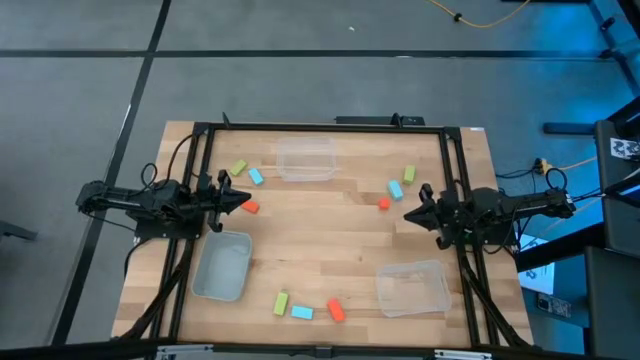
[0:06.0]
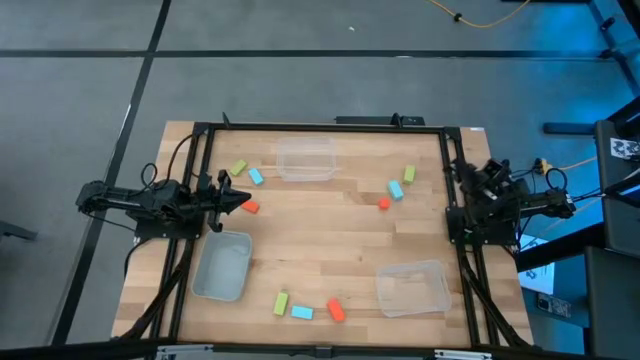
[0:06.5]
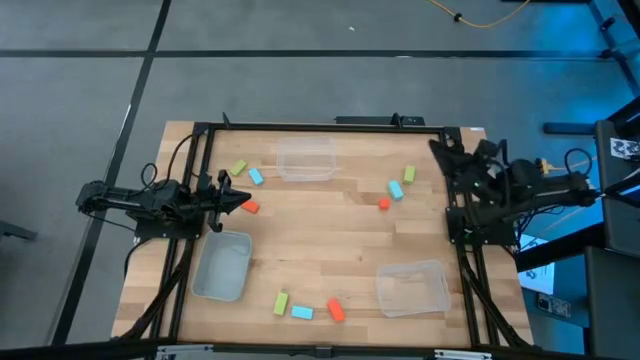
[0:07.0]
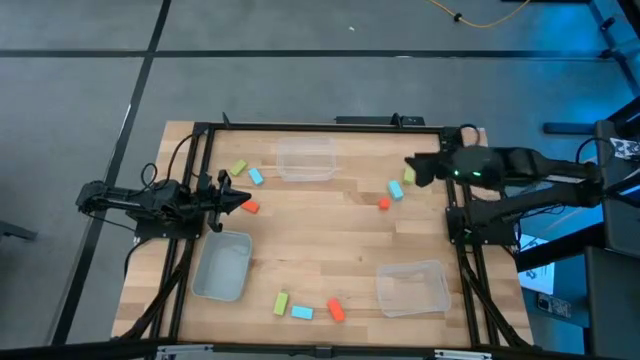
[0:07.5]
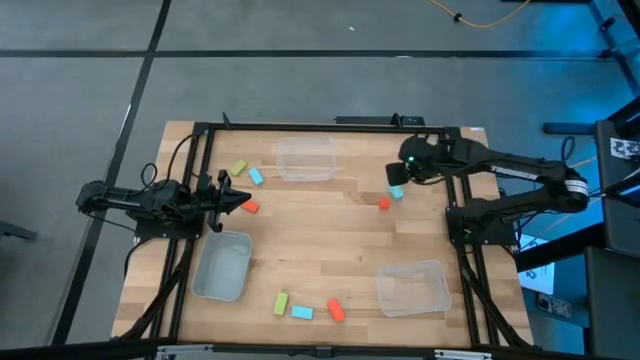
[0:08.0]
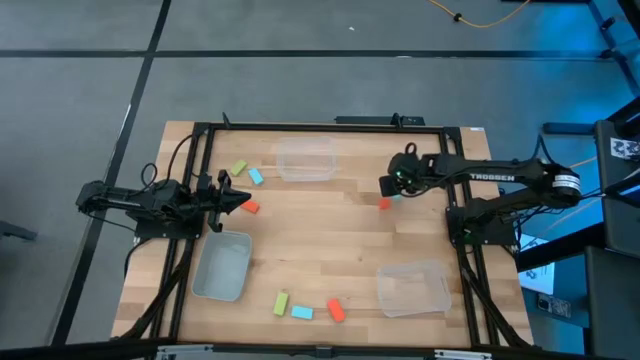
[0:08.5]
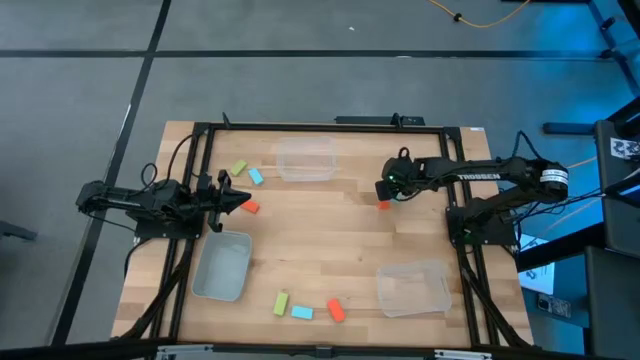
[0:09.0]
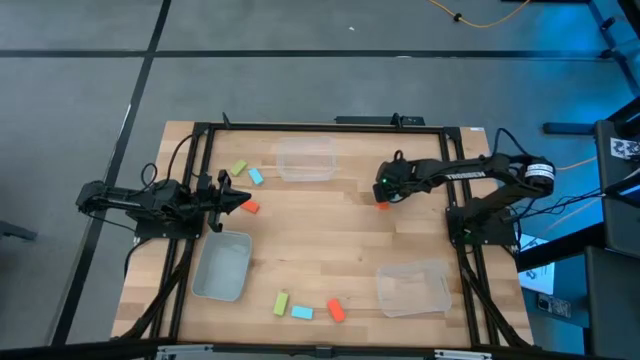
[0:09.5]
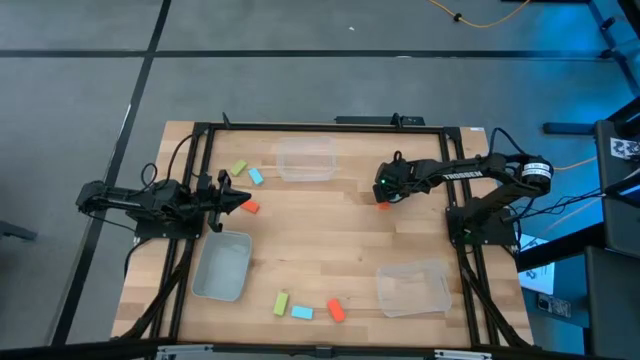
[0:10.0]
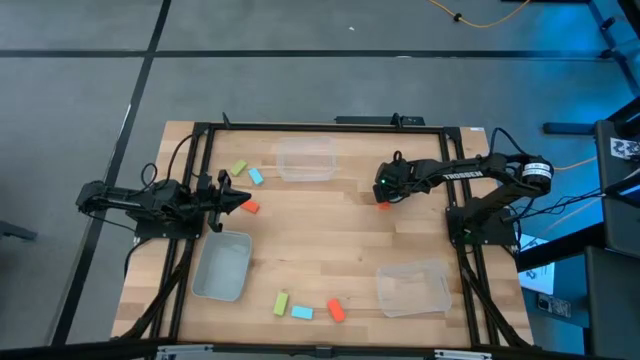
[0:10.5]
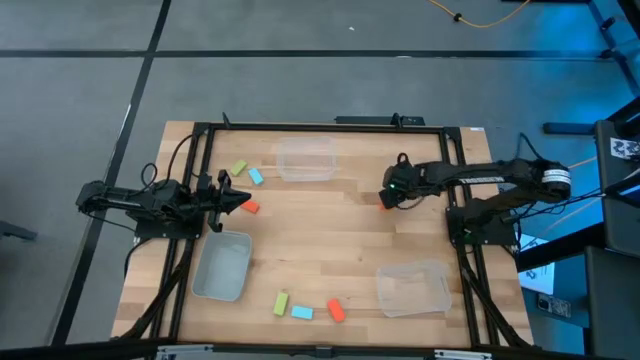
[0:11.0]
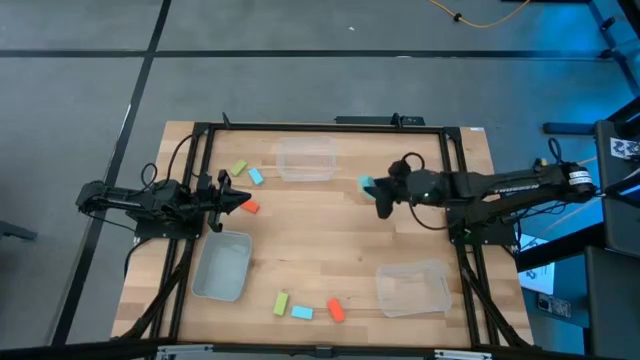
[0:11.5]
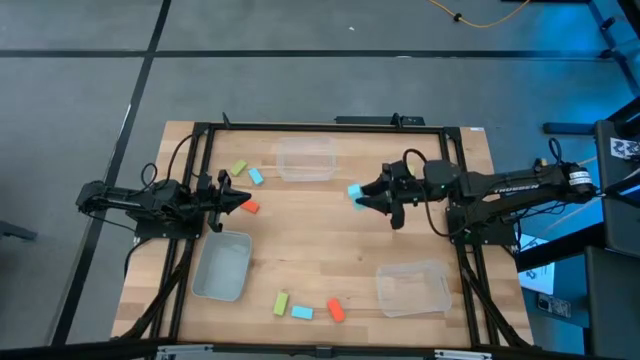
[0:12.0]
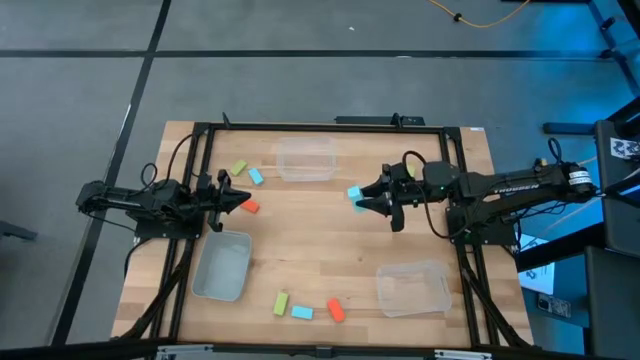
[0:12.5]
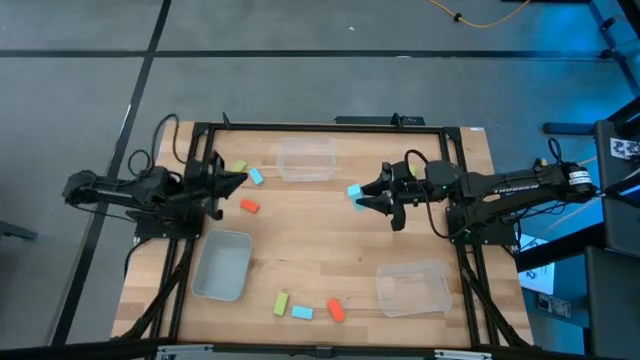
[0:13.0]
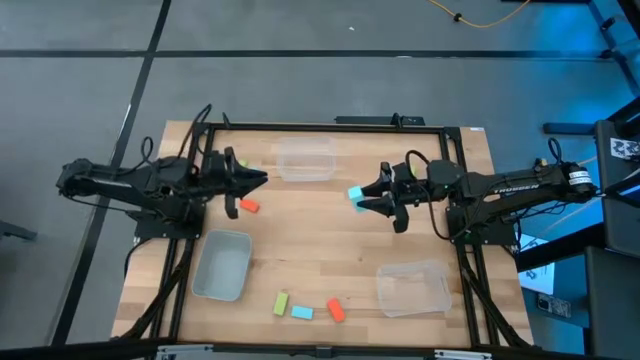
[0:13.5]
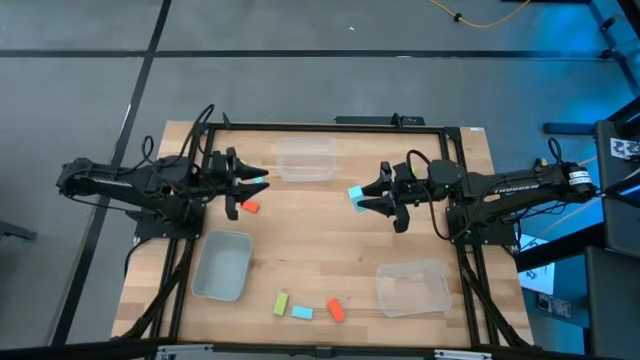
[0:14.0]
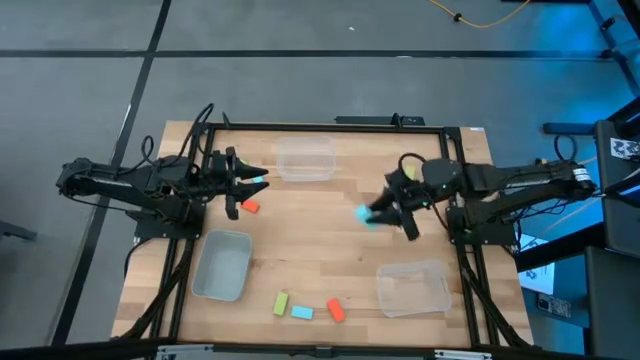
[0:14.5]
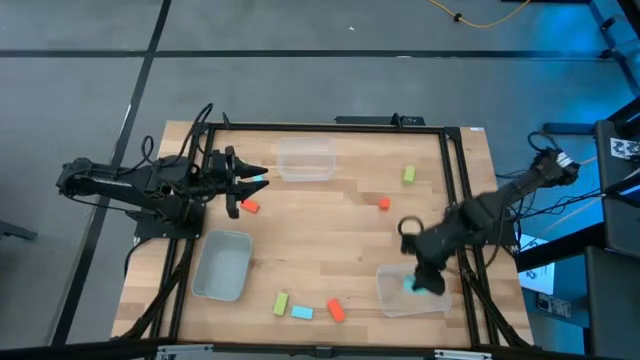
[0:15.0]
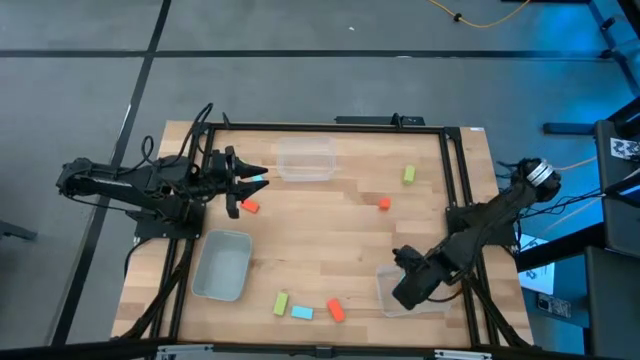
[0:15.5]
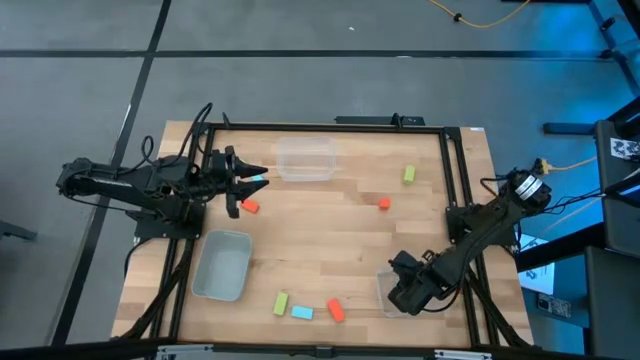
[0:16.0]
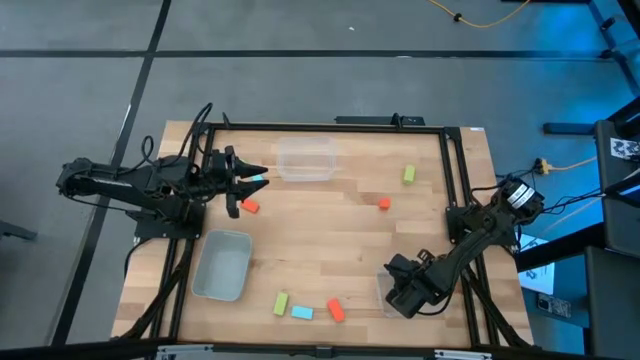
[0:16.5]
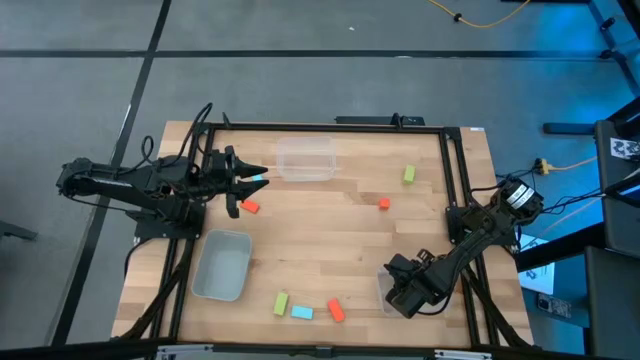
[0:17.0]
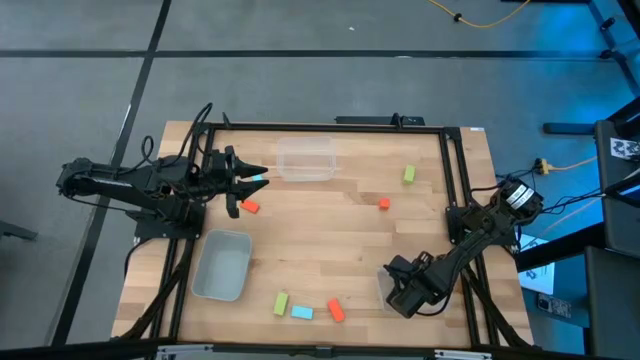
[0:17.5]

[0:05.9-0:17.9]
Task: Sort & place blocks by color
Put the top right light blue half pillar block into the bottom right transparent bin

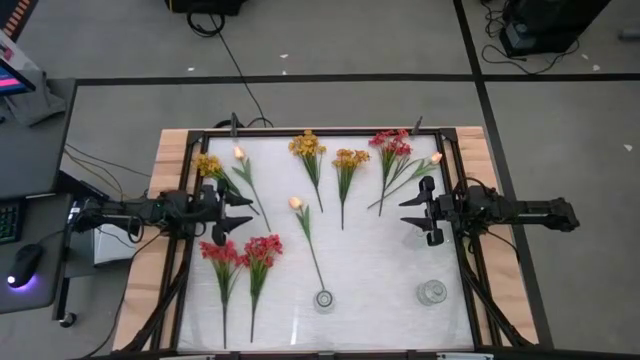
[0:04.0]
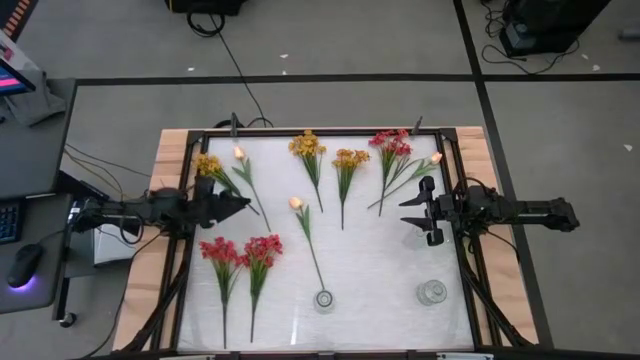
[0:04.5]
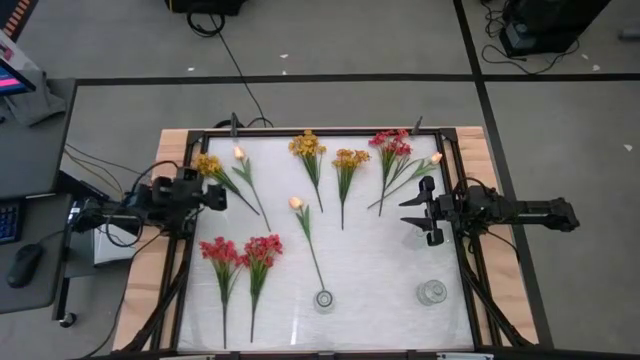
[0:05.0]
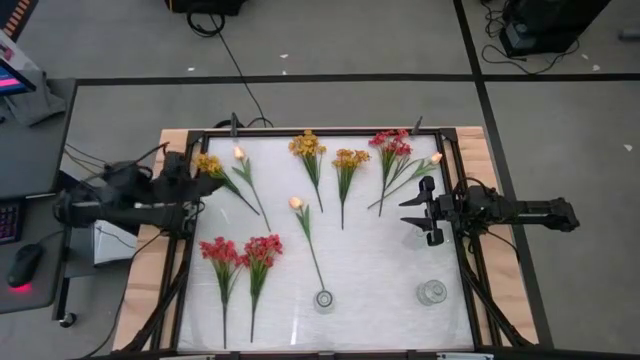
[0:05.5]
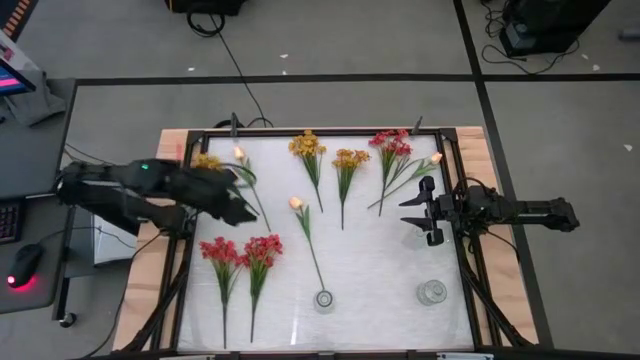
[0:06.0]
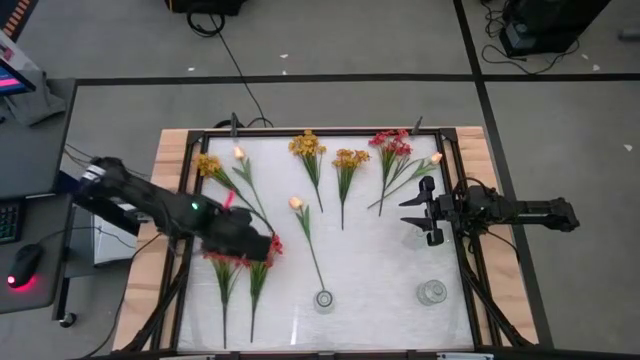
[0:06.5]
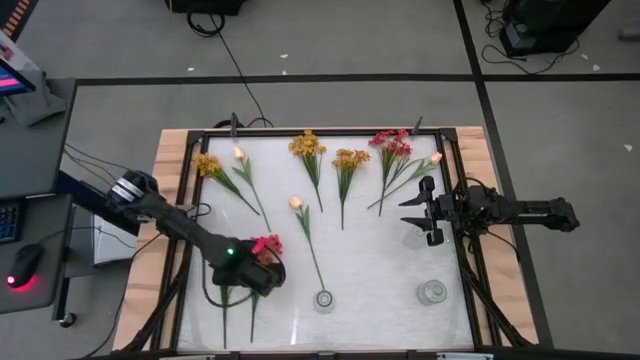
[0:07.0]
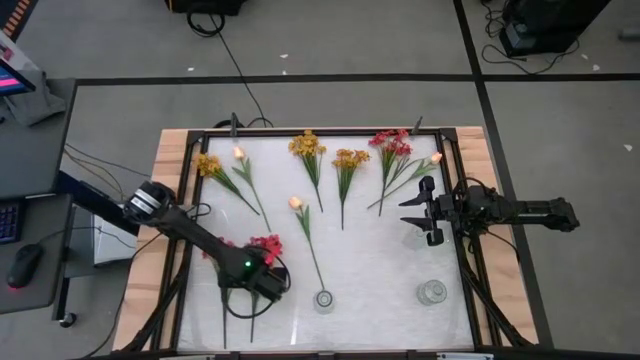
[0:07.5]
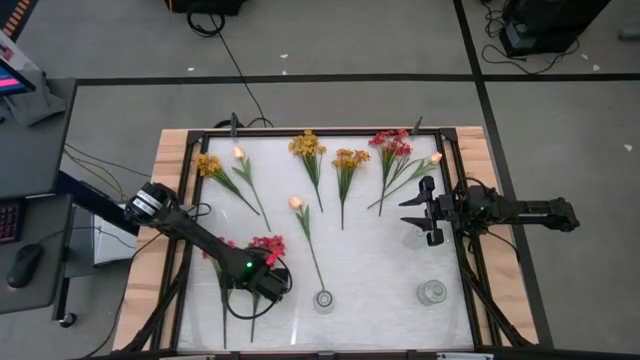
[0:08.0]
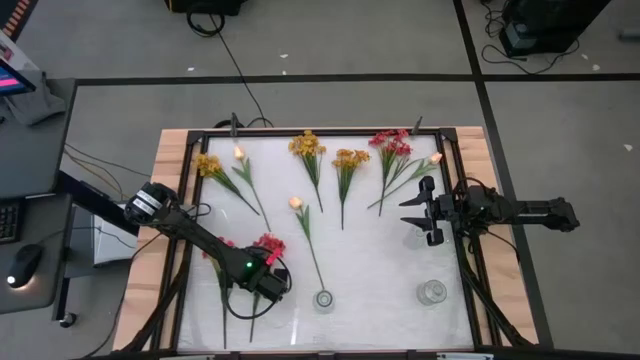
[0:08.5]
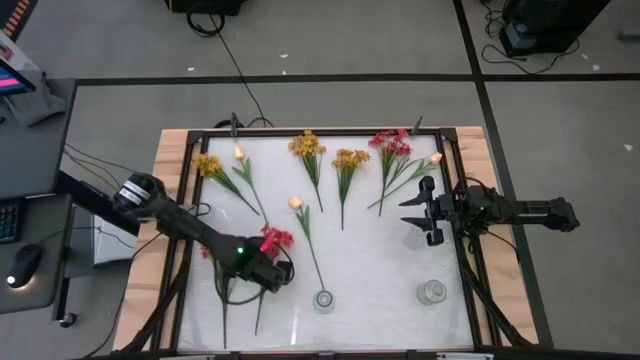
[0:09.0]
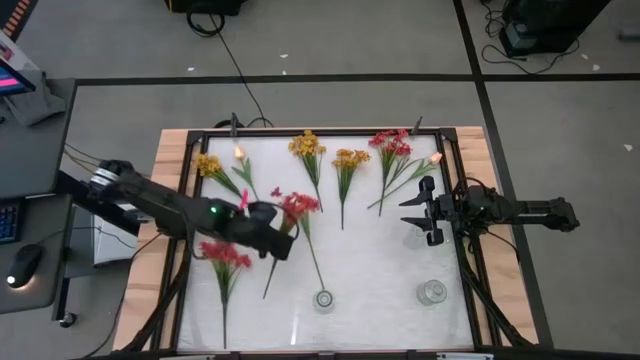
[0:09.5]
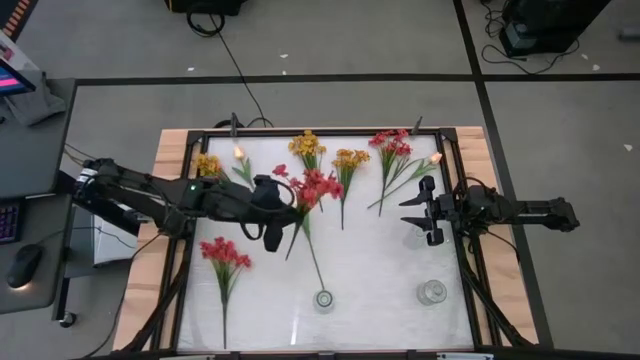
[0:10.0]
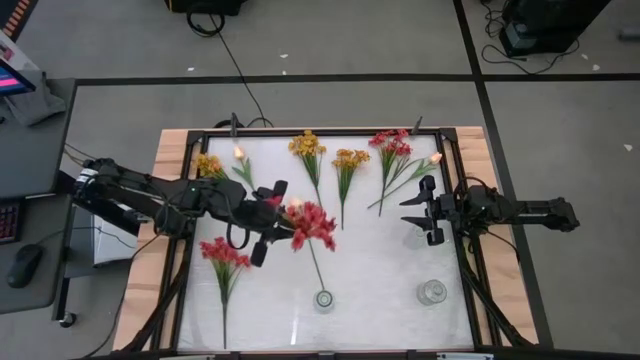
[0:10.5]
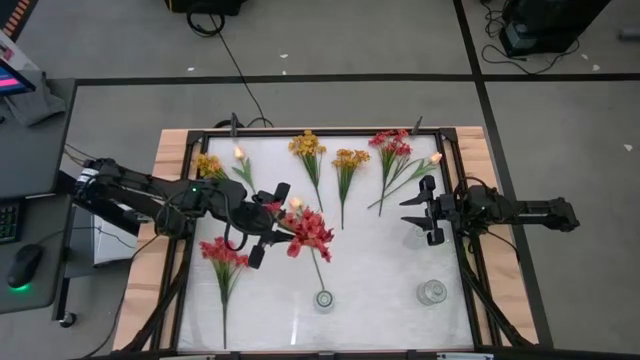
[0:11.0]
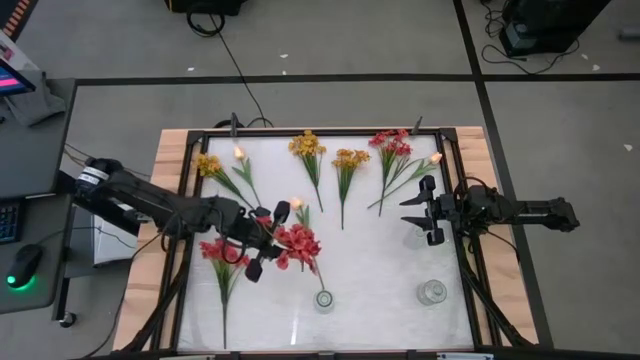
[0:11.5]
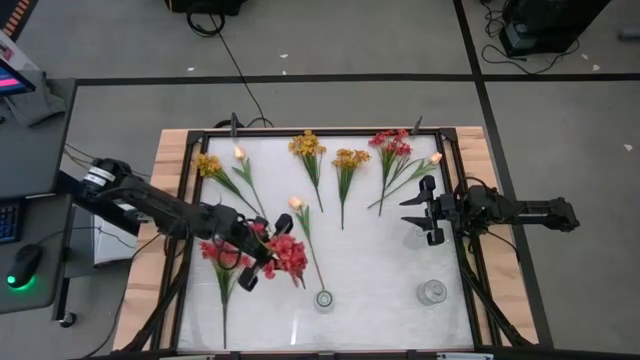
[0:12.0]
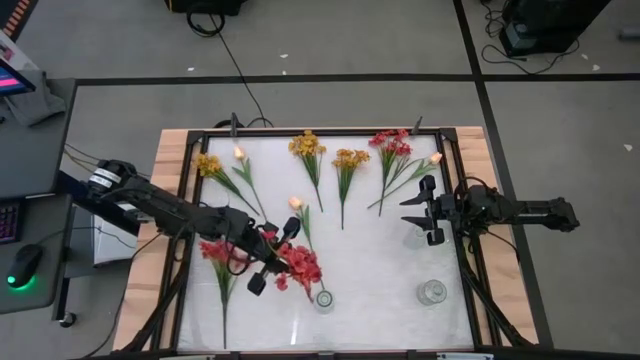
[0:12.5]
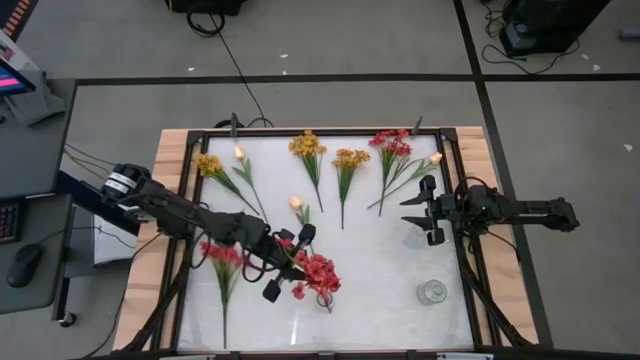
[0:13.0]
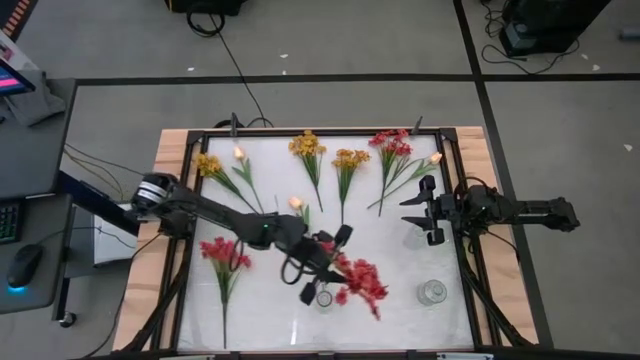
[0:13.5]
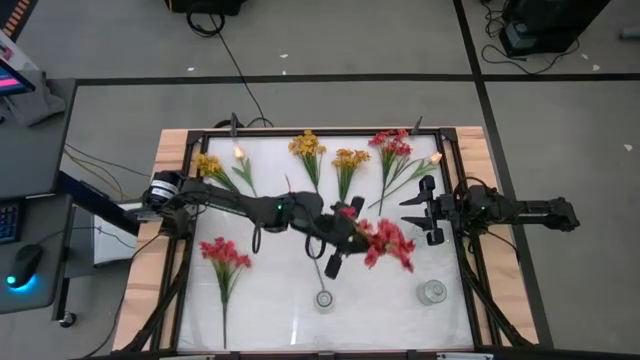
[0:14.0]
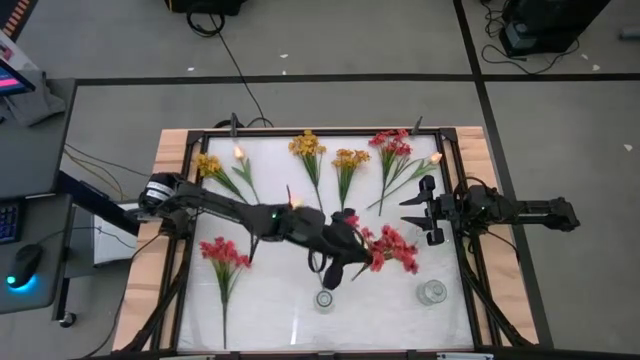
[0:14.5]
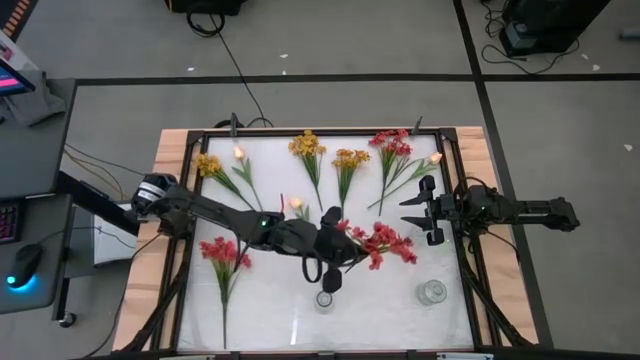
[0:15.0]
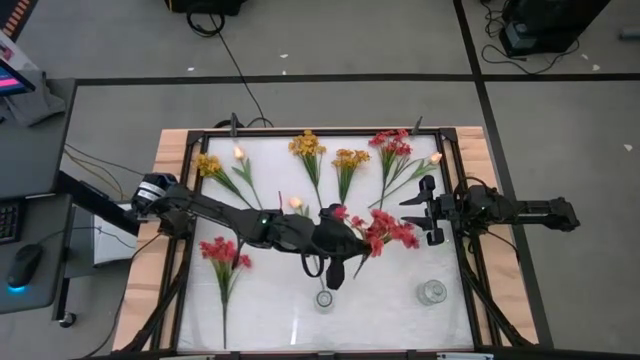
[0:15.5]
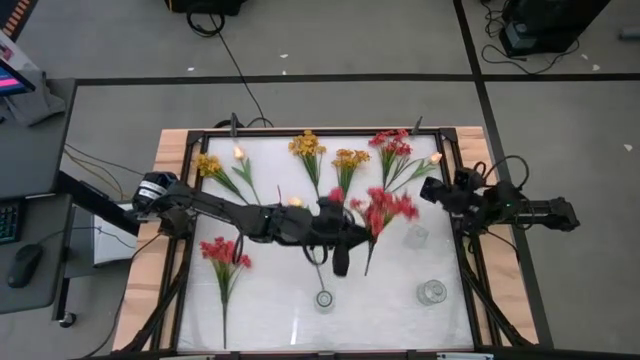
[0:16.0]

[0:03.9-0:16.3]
Task: Sort flowers into vase by color
Put the bottom right pink flowers into the bottom right transparent vase
